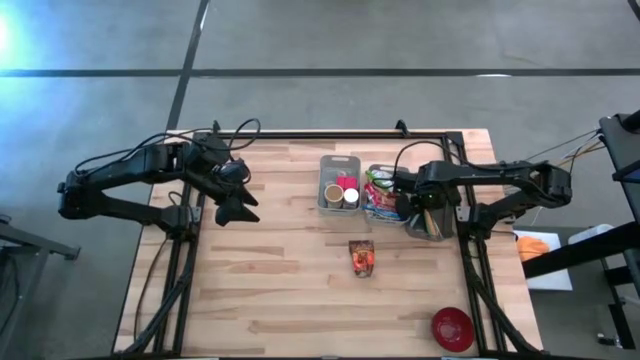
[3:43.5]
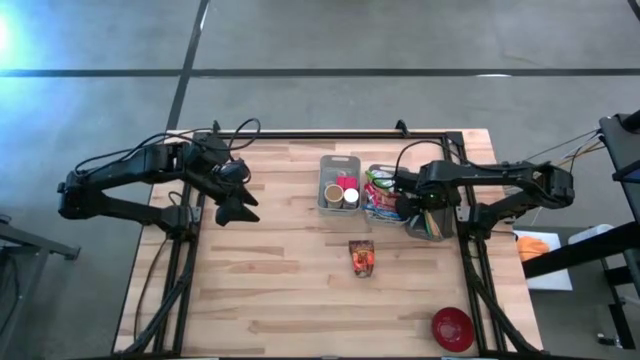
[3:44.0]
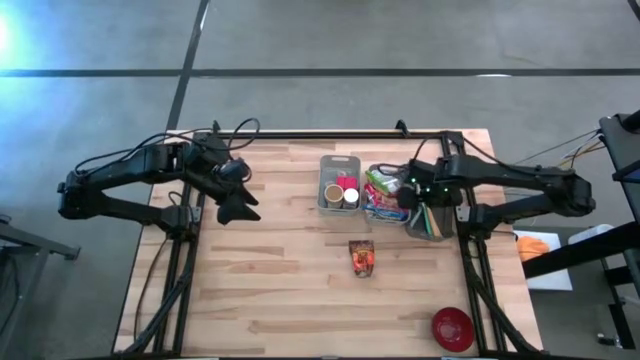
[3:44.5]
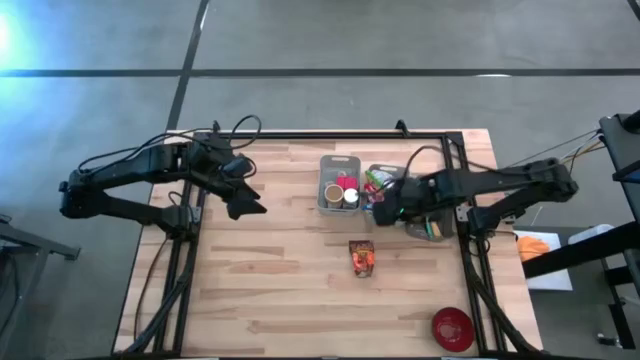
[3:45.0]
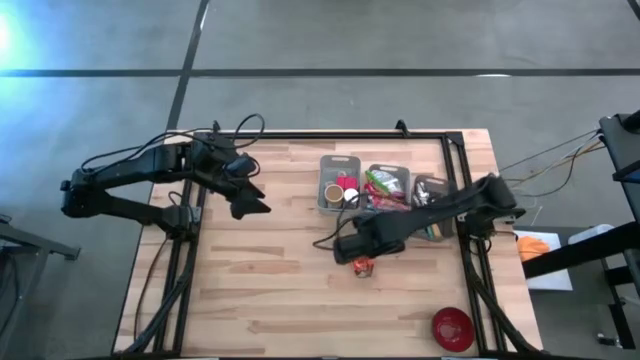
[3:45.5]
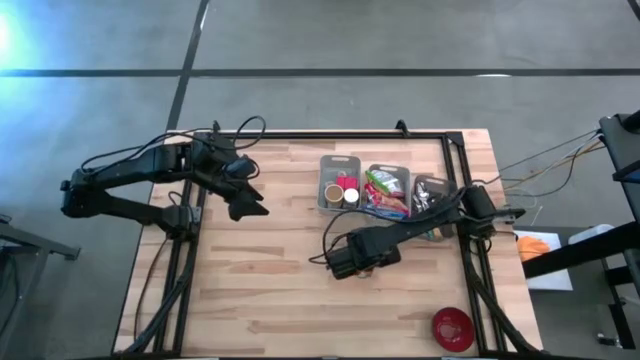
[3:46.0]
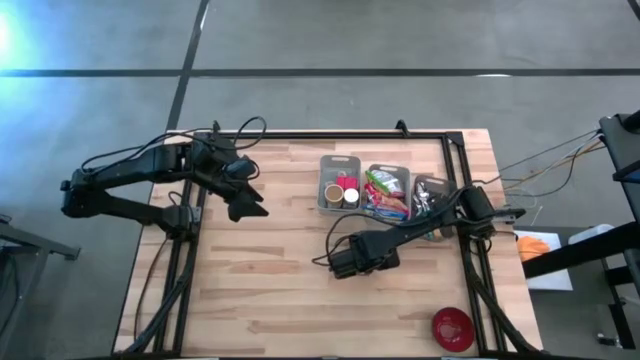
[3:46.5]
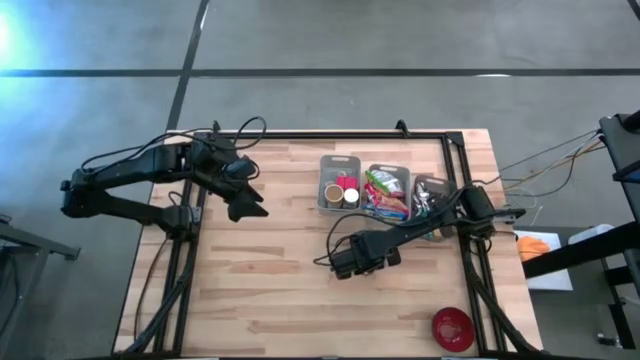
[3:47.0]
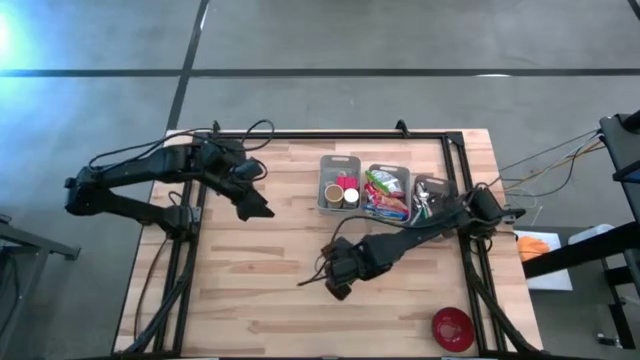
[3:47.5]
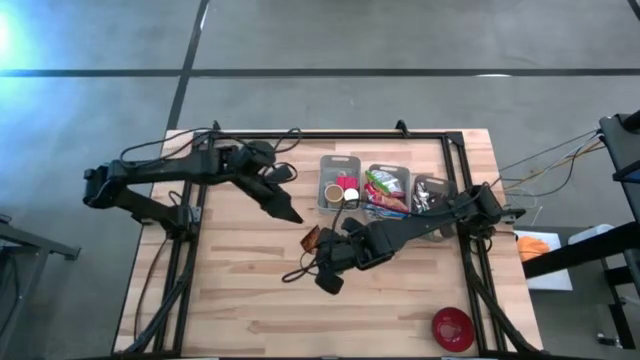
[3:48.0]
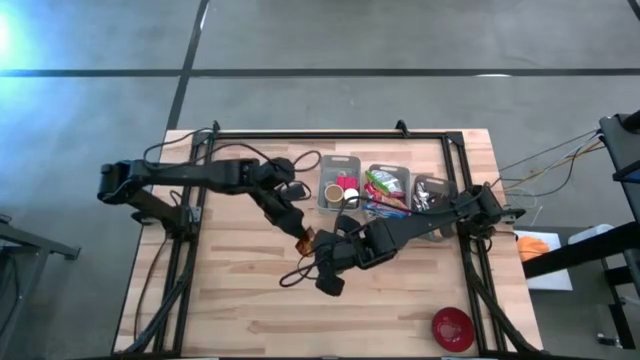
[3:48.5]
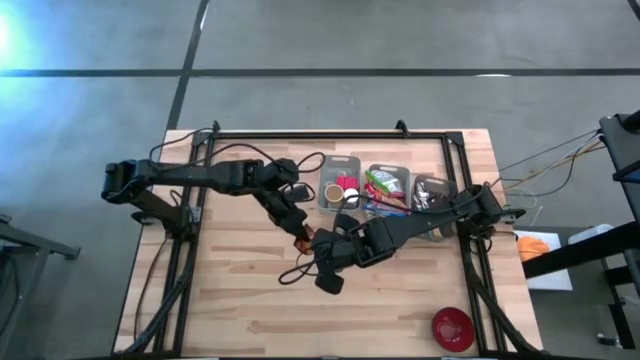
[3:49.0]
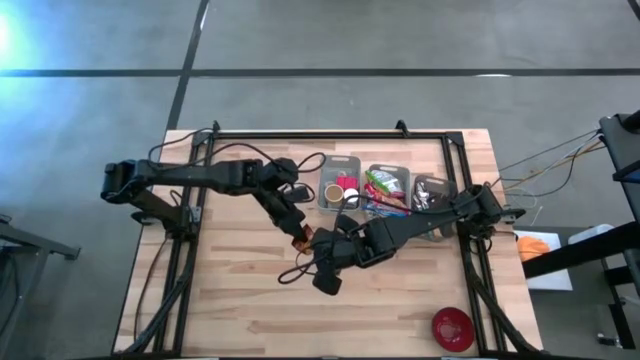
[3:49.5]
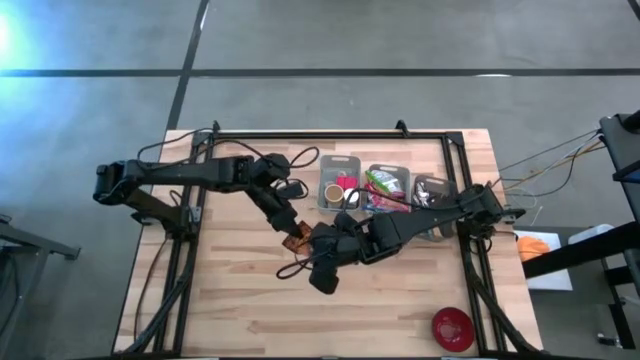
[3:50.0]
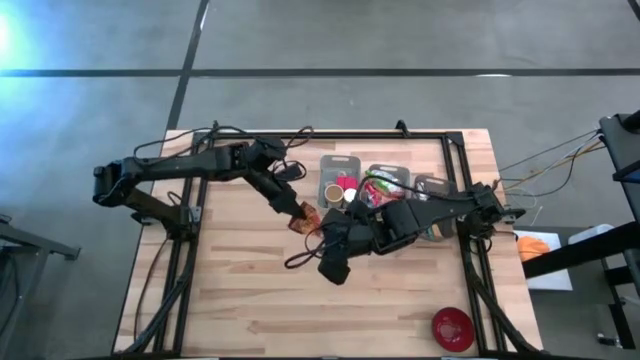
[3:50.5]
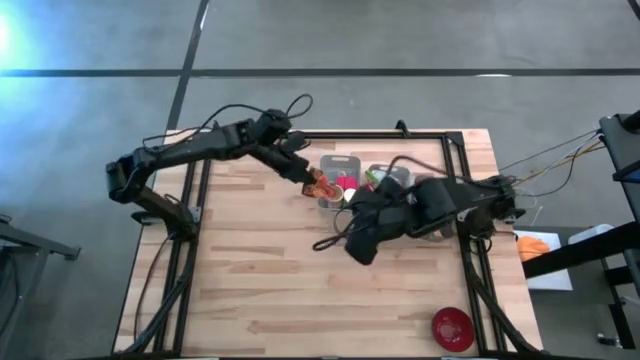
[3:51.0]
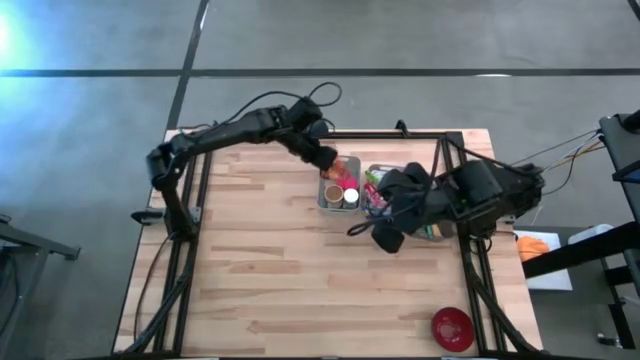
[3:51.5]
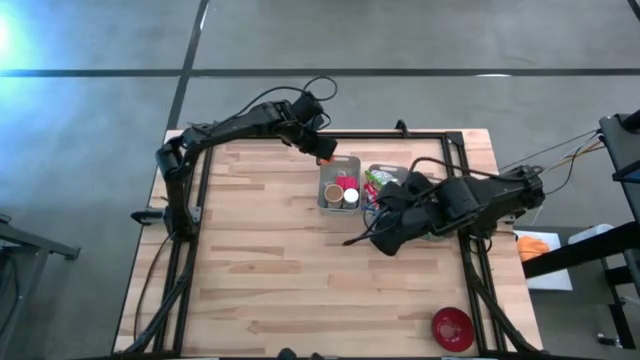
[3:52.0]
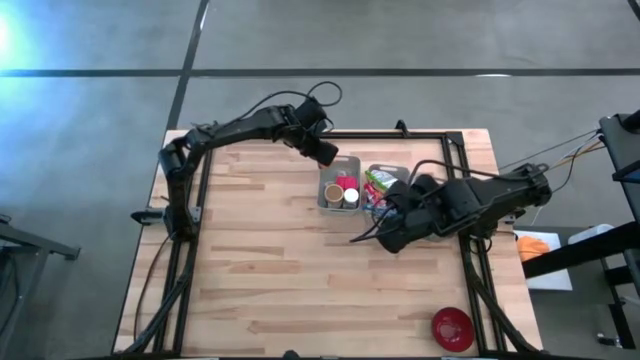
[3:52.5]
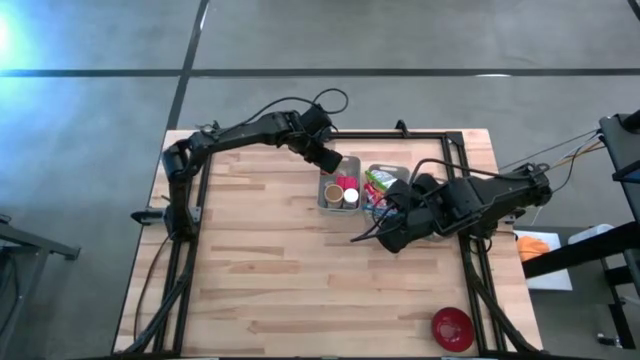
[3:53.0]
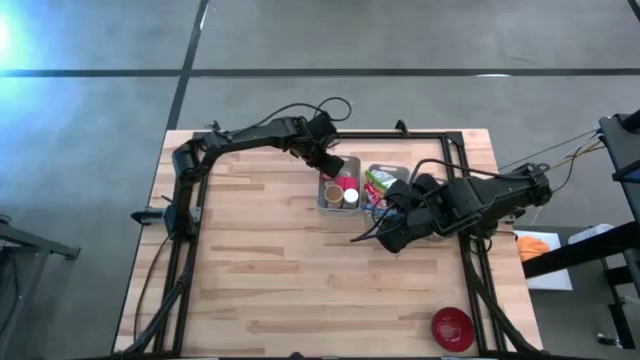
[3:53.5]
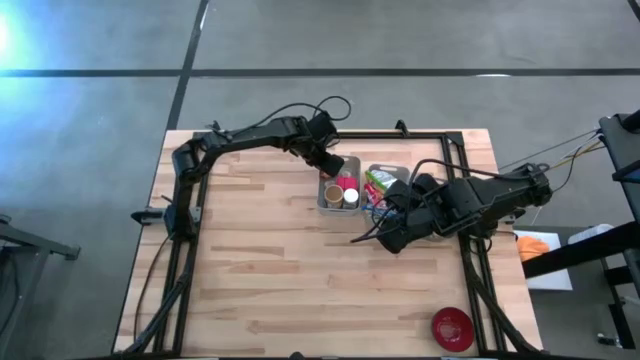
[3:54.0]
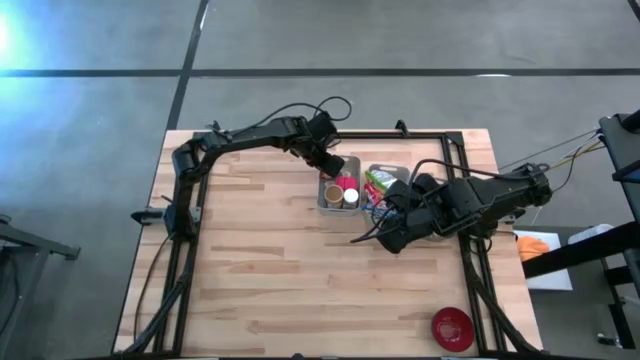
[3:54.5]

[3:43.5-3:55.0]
Put the orange seasoning bag into the left gray bin

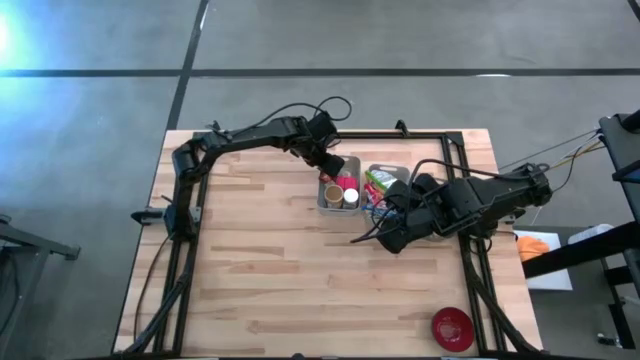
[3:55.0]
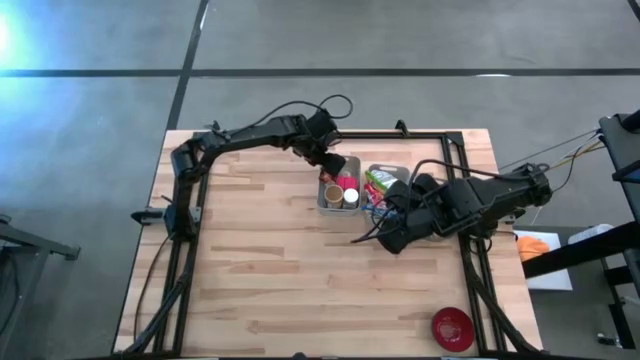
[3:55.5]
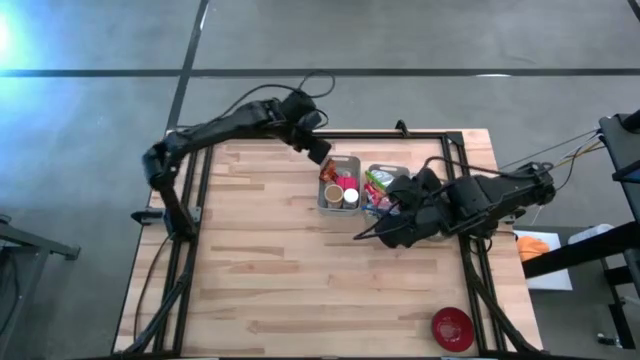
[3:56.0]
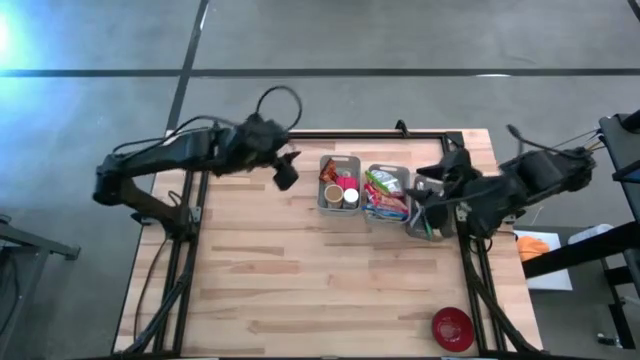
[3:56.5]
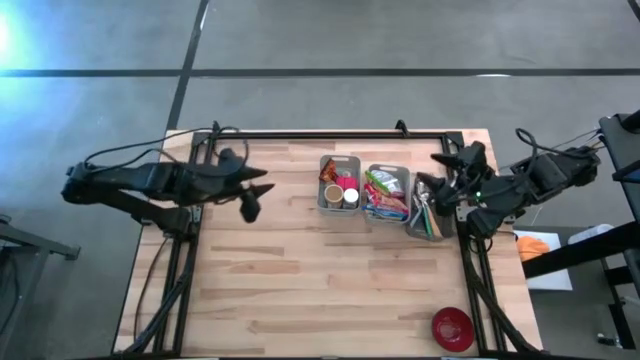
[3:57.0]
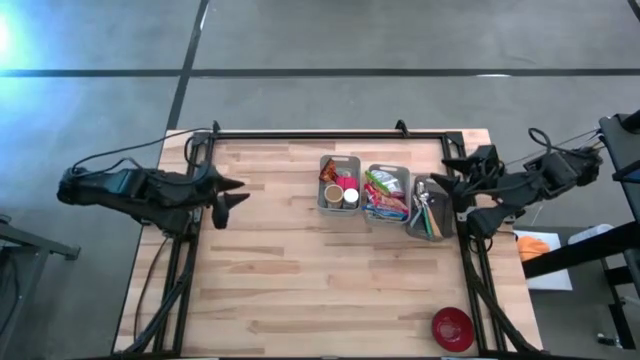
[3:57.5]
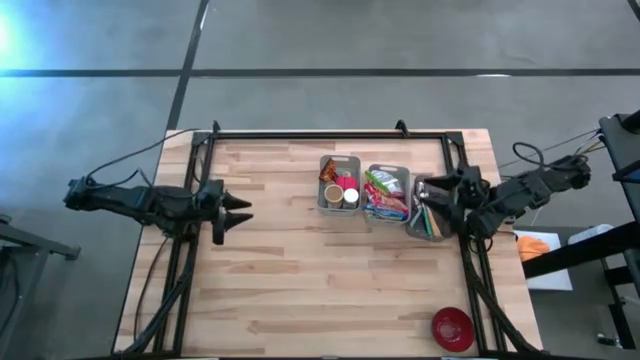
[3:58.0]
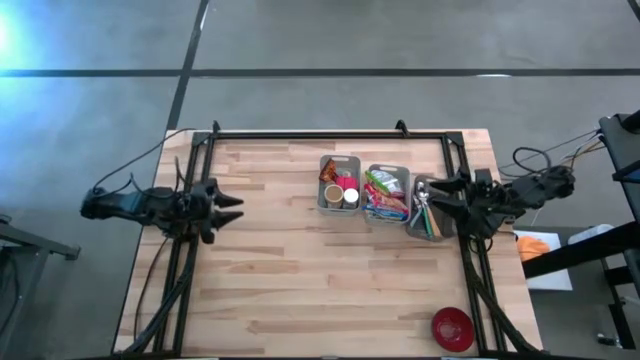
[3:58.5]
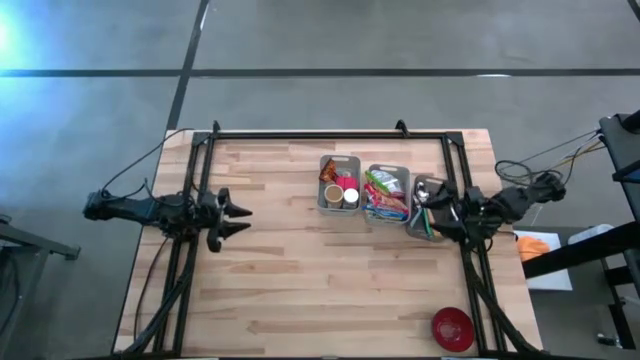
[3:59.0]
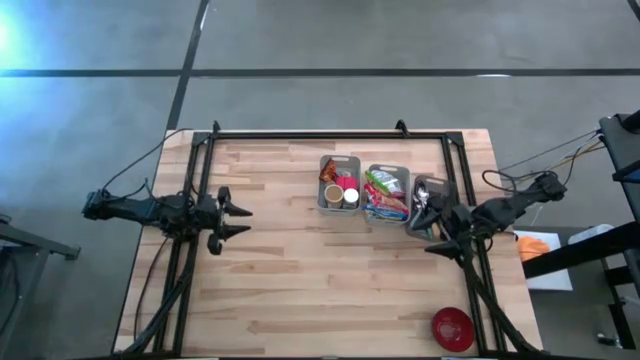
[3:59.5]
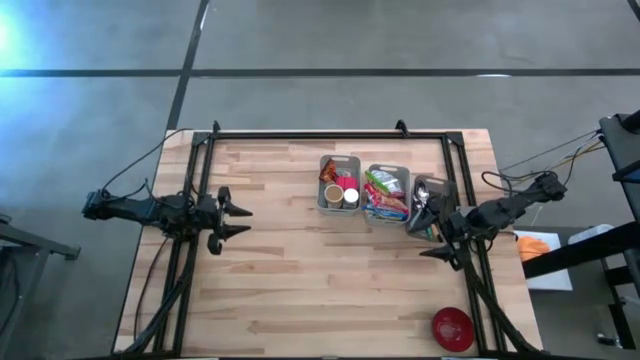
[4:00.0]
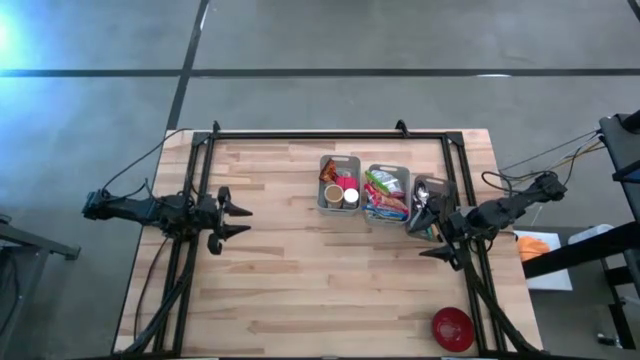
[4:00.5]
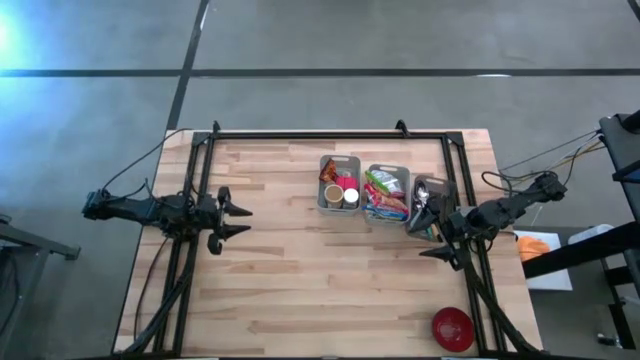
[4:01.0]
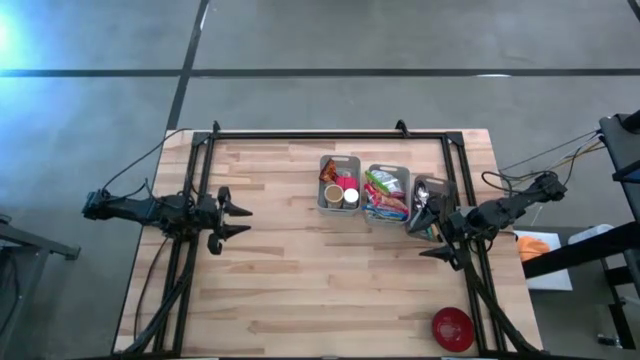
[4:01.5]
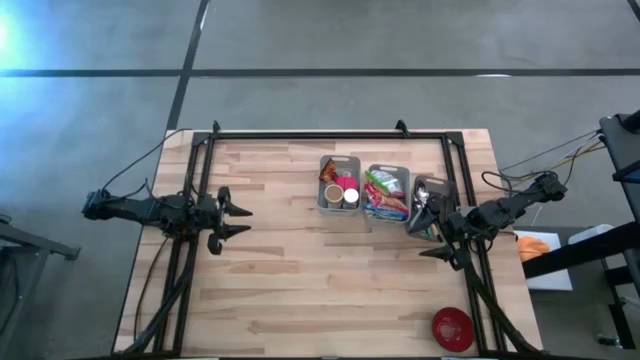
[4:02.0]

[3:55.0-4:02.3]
Return to Home Position
